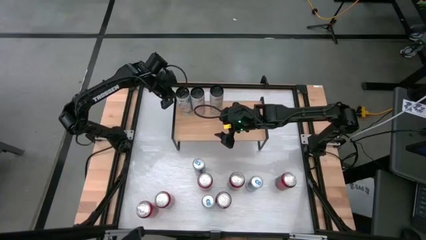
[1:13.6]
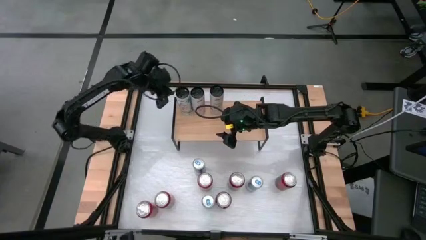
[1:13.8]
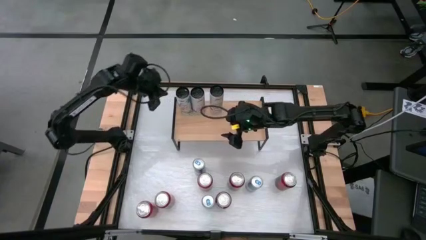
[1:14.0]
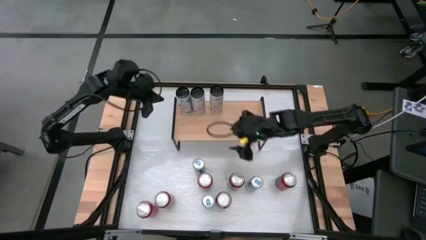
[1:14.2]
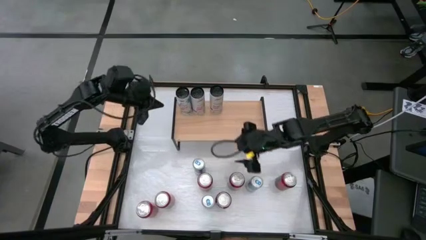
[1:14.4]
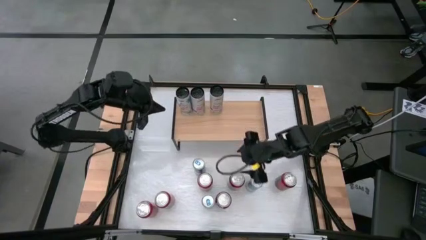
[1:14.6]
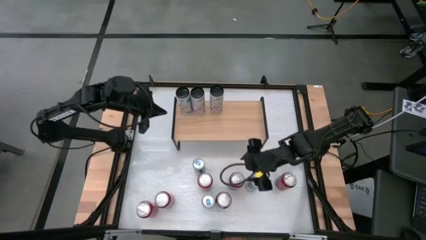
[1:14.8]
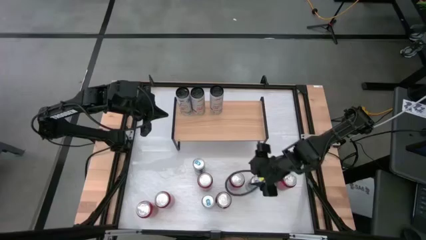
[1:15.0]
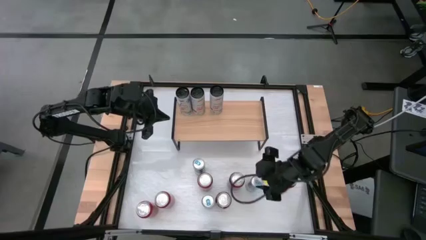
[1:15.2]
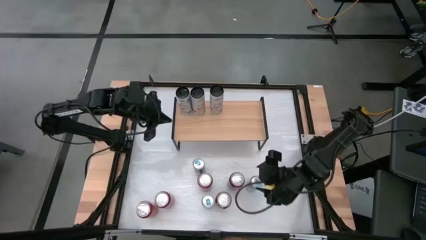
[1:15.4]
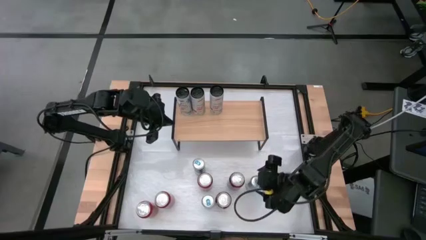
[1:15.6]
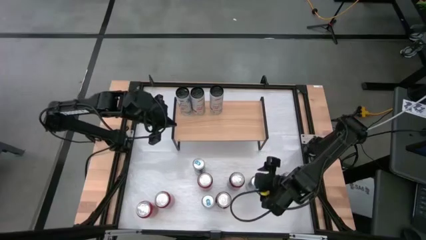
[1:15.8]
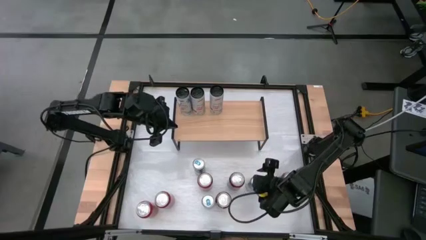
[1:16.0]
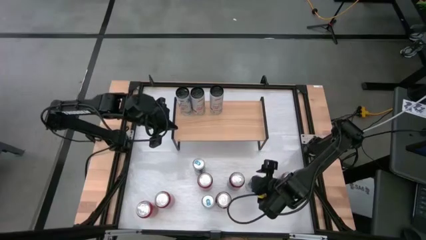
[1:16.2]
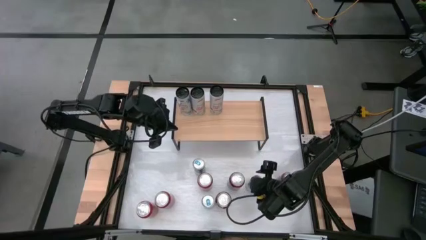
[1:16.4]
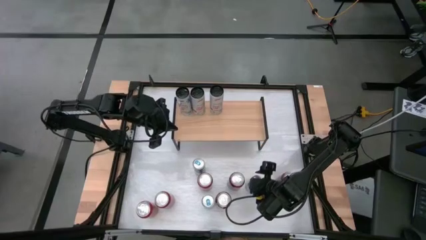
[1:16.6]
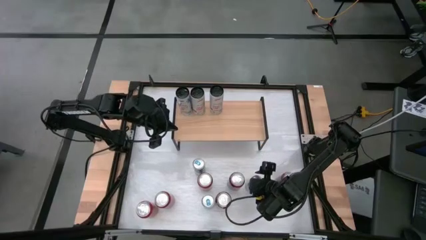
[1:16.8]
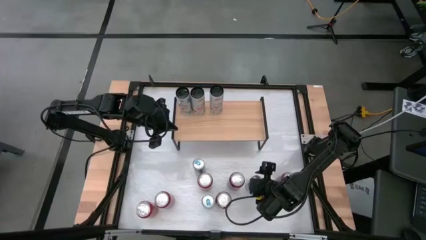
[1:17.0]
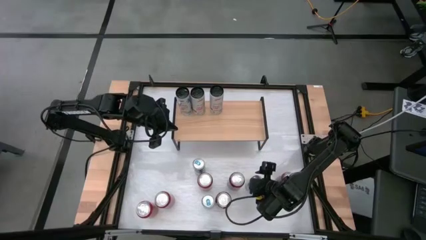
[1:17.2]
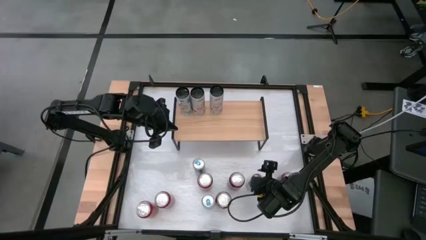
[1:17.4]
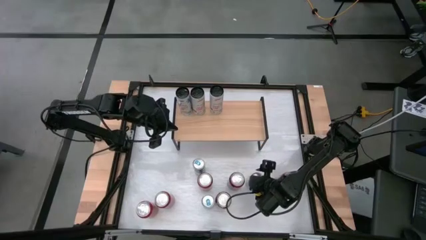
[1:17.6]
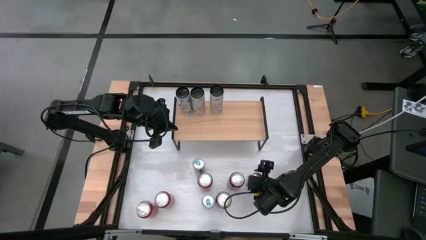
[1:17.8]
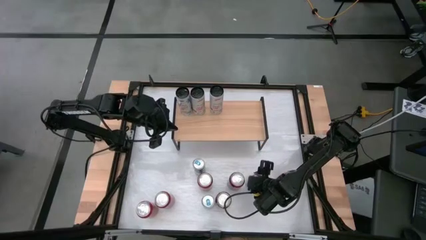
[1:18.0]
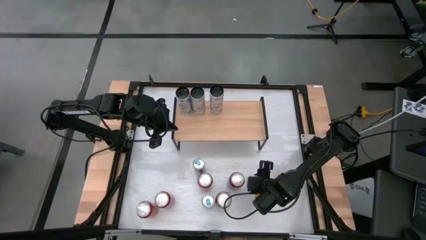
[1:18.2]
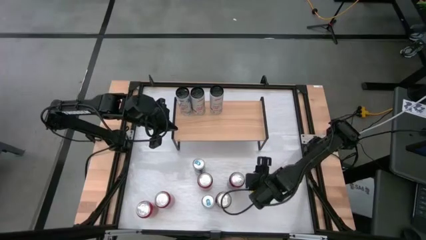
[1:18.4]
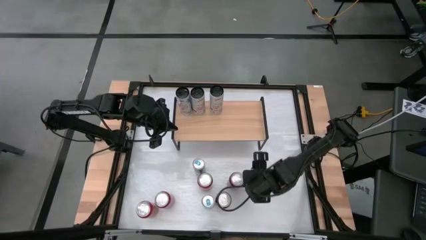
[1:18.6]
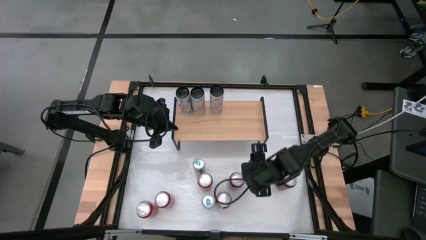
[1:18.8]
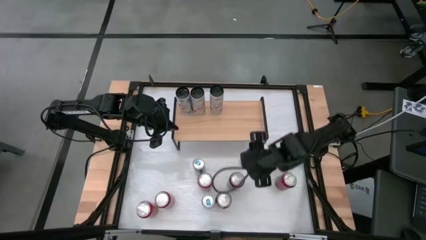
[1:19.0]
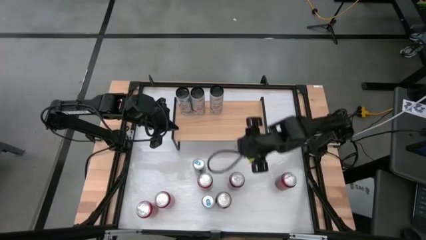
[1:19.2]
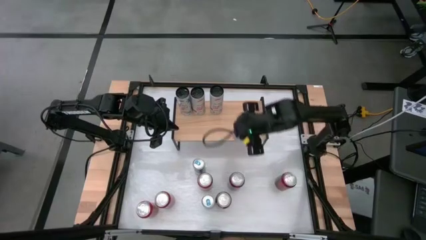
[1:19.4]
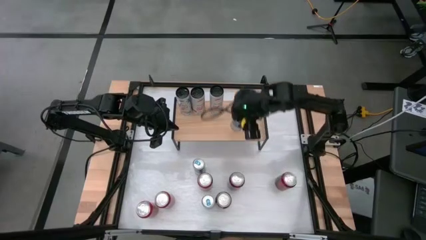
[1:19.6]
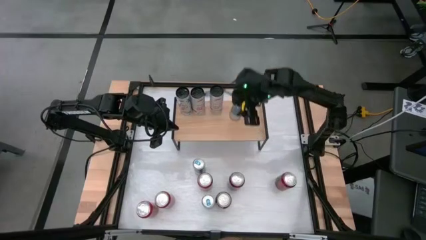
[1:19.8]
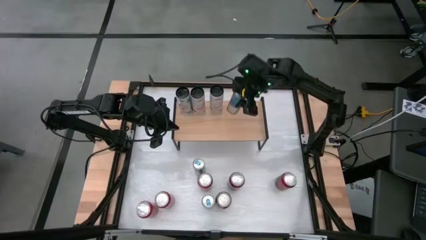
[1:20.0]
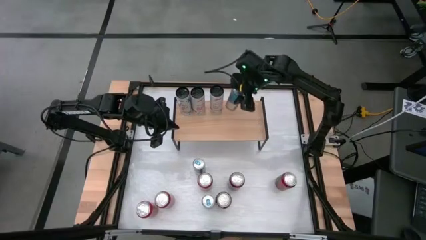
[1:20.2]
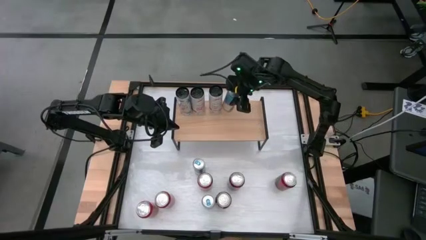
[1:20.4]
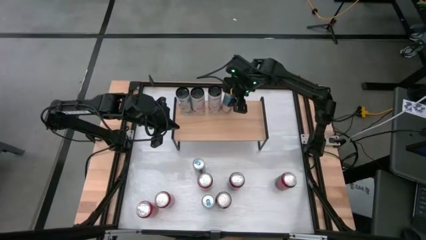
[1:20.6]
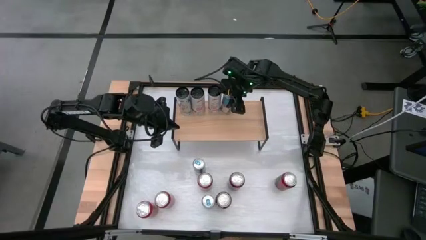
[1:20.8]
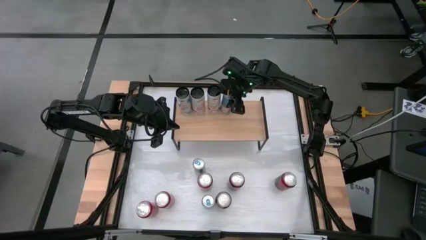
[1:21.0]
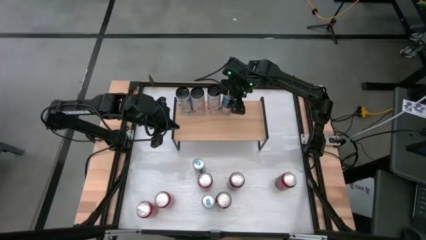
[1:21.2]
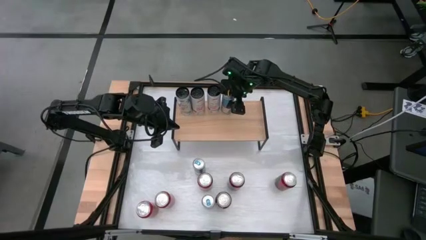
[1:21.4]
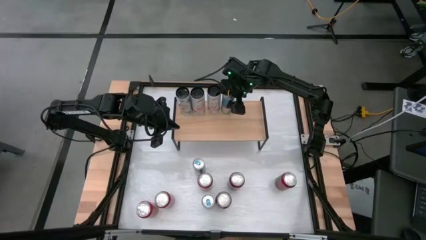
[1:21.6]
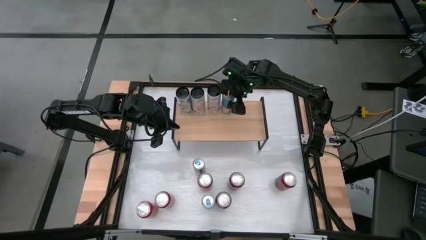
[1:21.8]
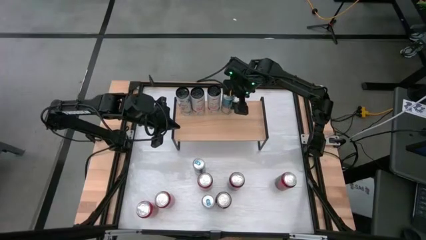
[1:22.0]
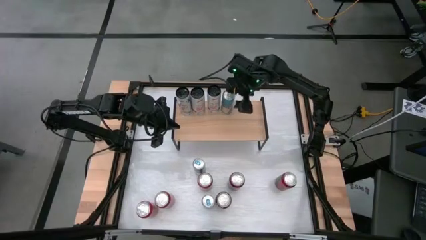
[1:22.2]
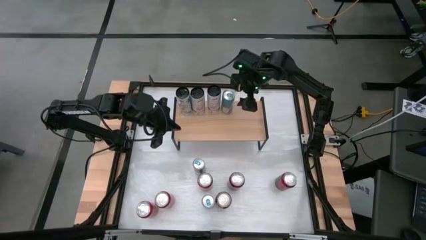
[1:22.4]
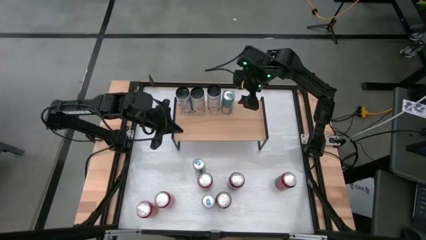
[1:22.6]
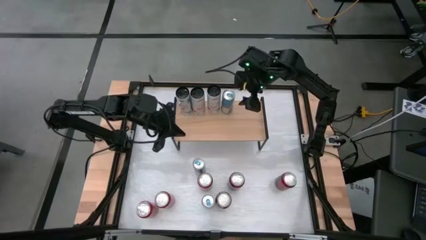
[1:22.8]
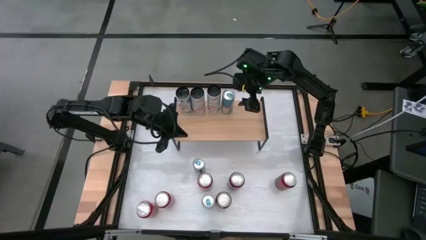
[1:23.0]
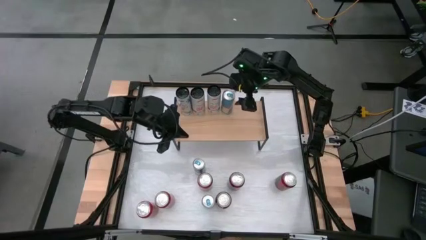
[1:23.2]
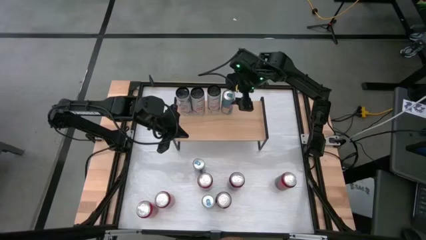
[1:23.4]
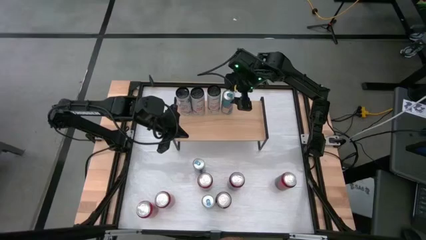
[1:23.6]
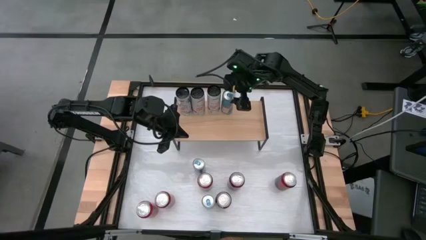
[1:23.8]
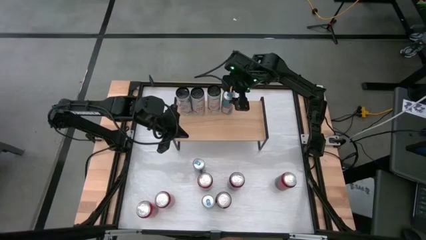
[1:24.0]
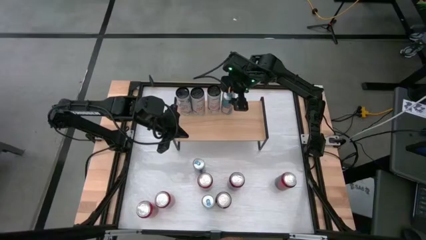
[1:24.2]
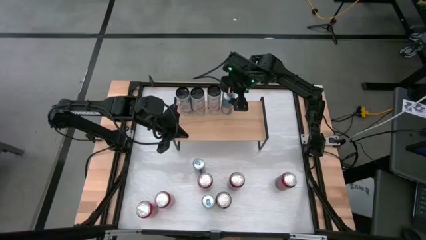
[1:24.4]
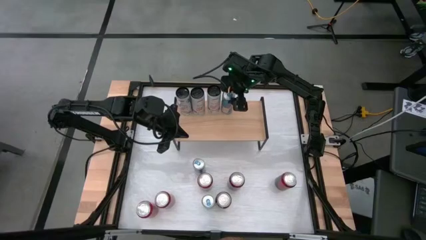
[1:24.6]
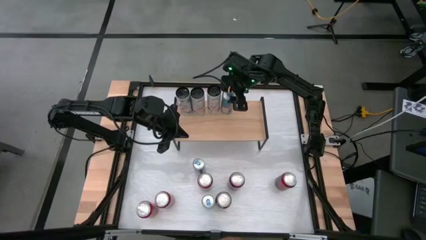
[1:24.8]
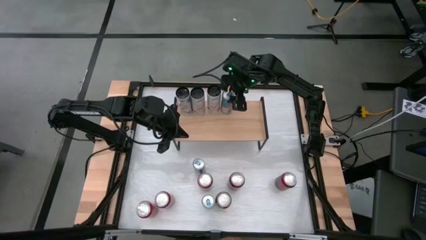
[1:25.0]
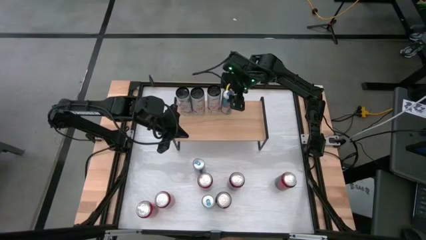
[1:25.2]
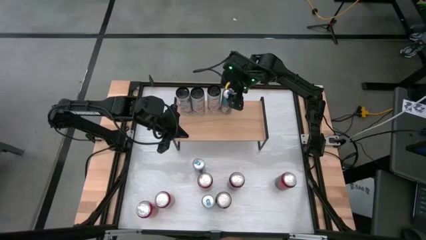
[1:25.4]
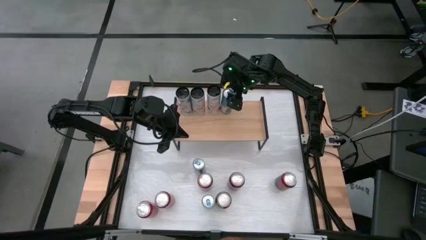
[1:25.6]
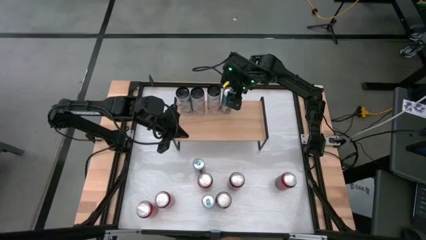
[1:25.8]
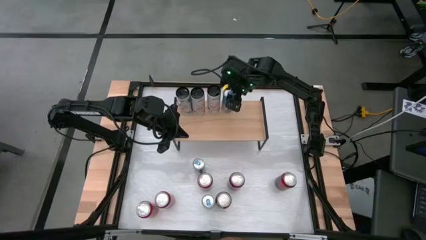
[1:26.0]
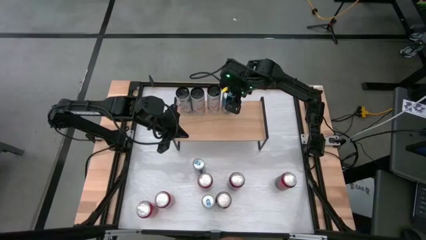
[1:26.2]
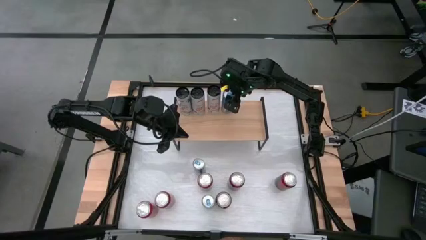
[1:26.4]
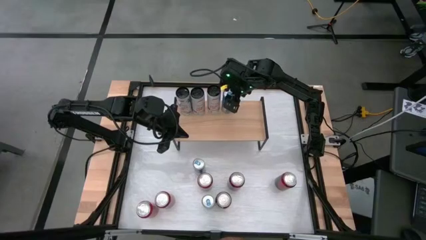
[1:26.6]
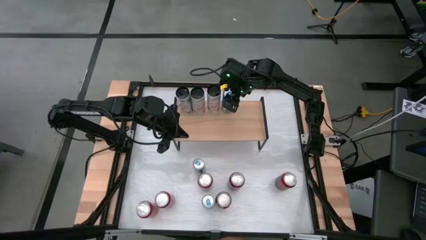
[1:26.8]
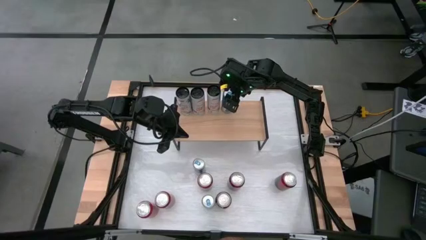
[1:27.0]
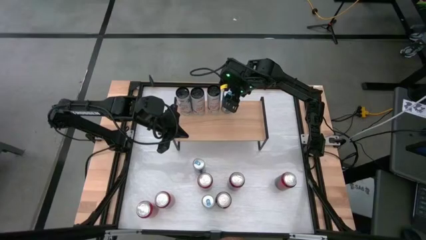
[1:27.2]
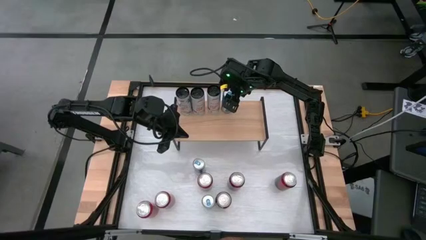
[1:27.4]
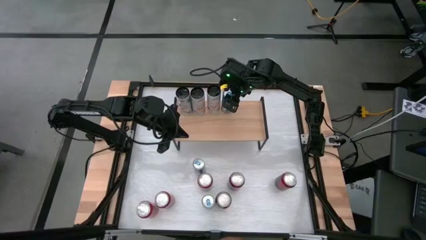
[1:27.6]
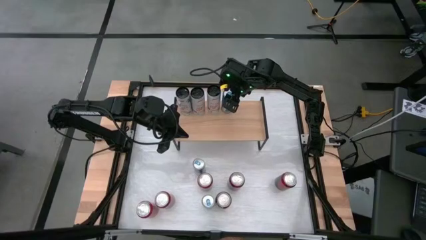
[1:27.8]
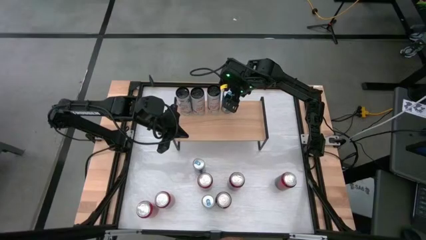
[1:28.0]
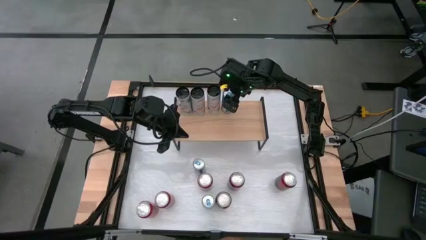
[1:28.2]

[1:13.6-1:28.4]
Task: Place canned beverage on shelf
Put the right blue soda can on the shelf
